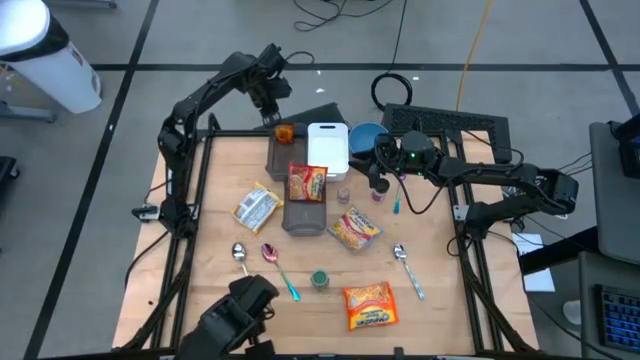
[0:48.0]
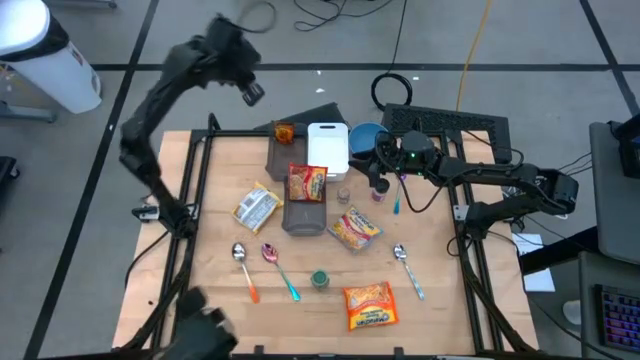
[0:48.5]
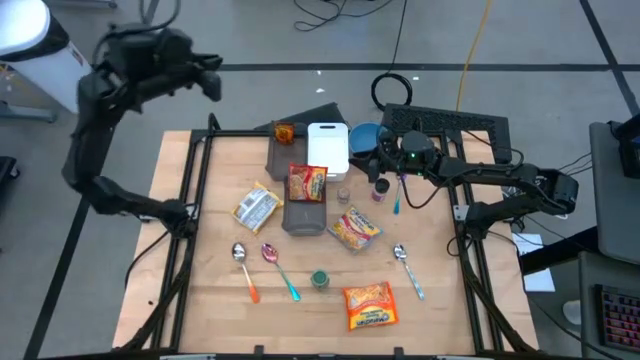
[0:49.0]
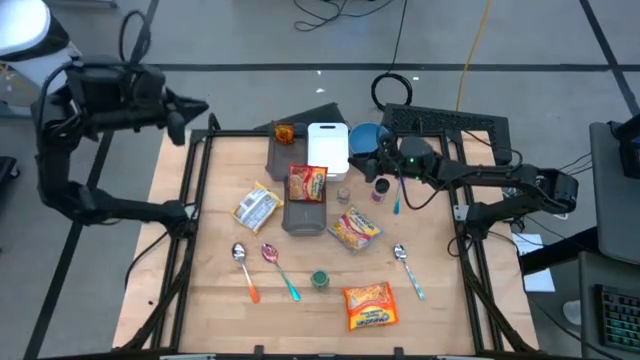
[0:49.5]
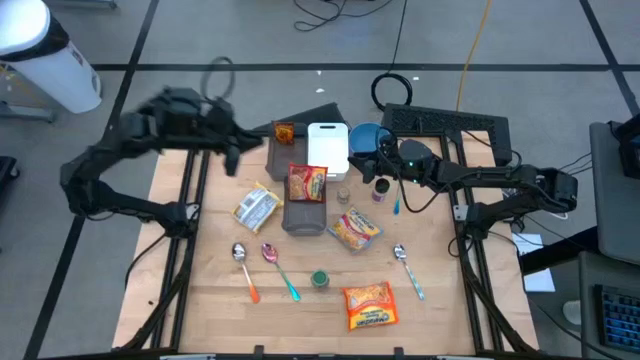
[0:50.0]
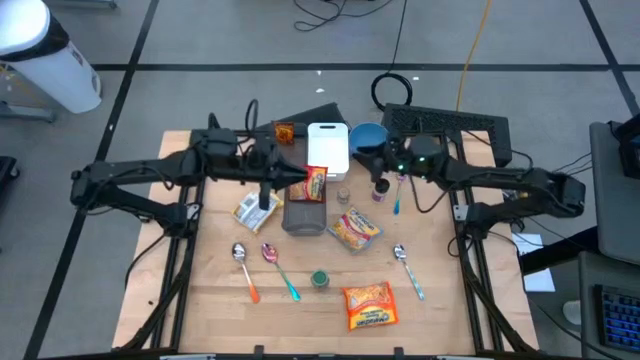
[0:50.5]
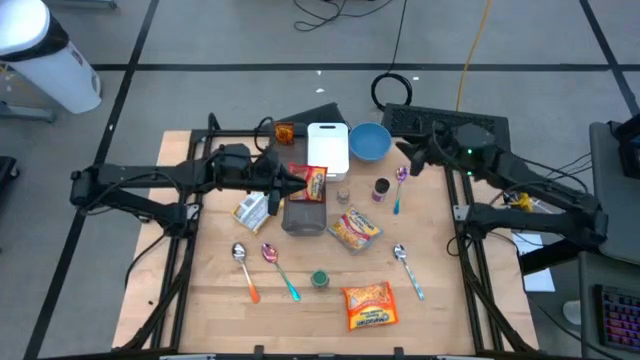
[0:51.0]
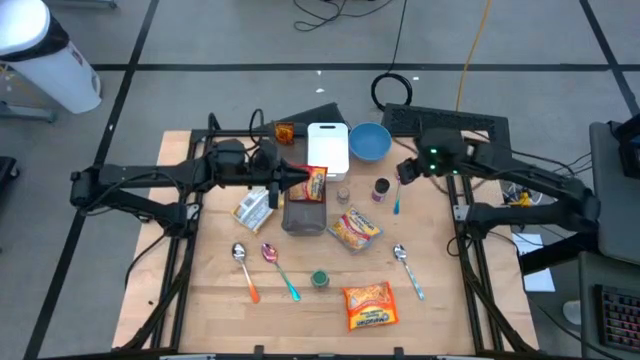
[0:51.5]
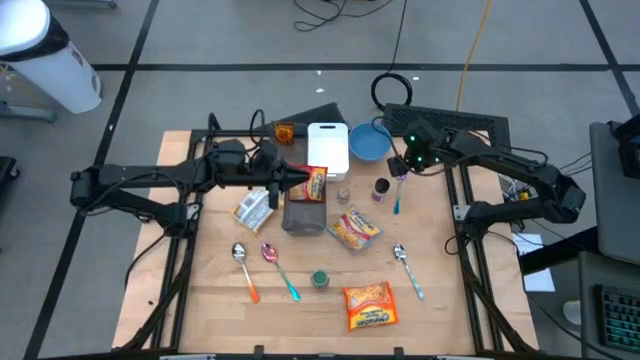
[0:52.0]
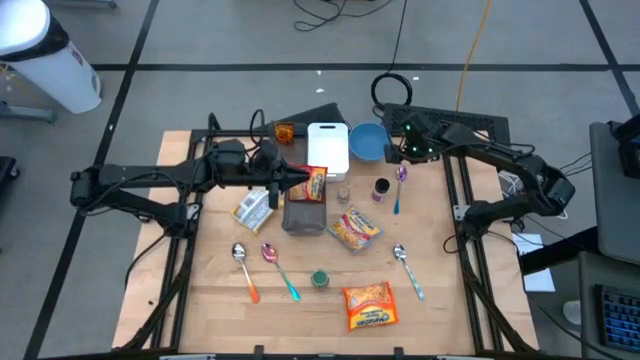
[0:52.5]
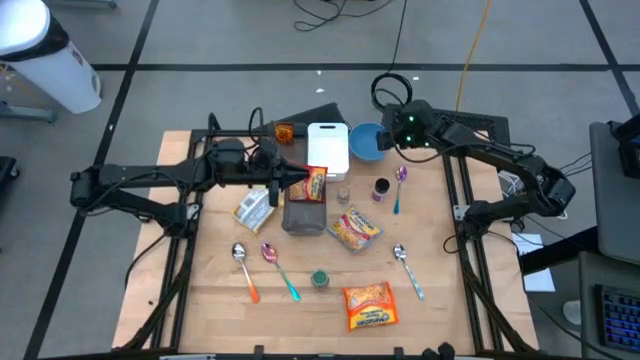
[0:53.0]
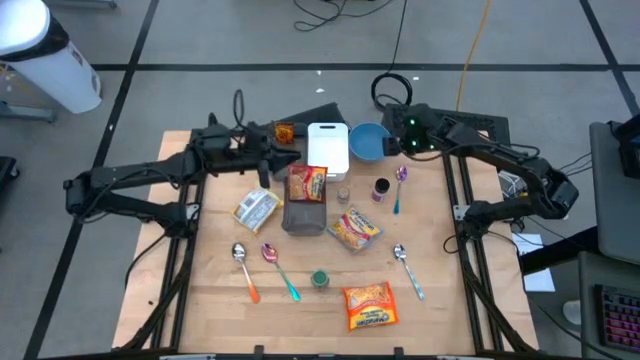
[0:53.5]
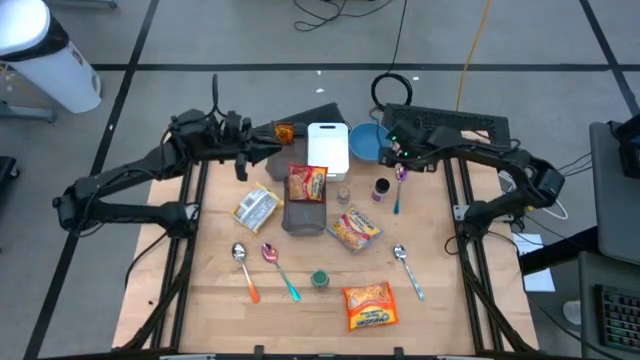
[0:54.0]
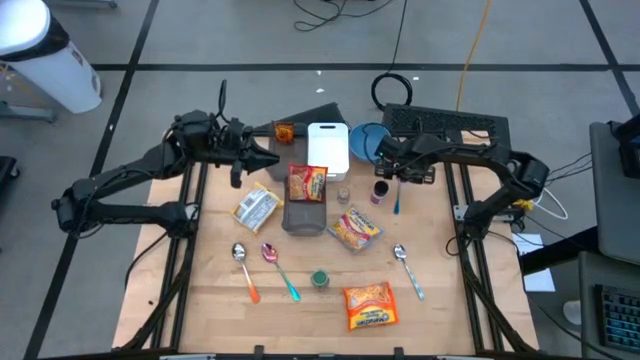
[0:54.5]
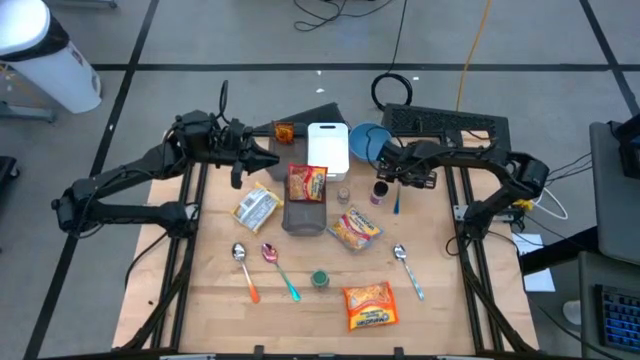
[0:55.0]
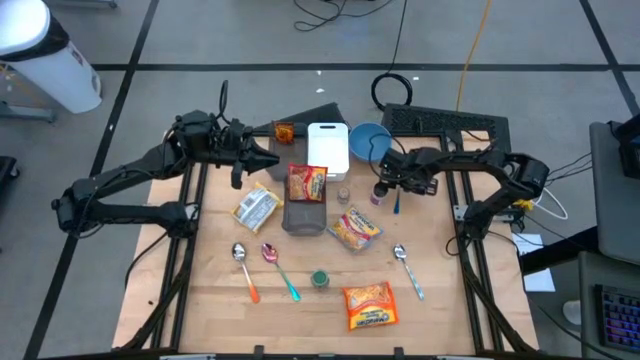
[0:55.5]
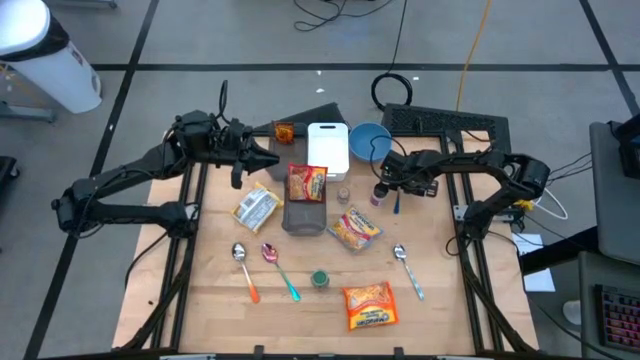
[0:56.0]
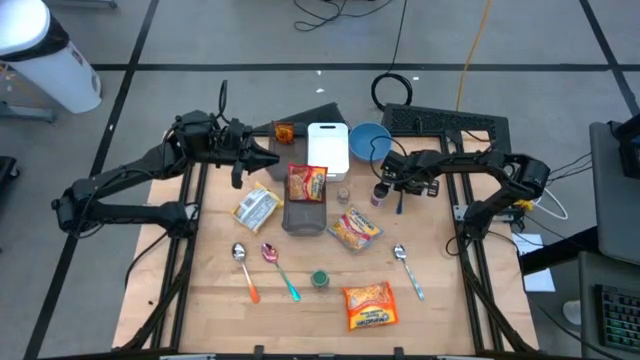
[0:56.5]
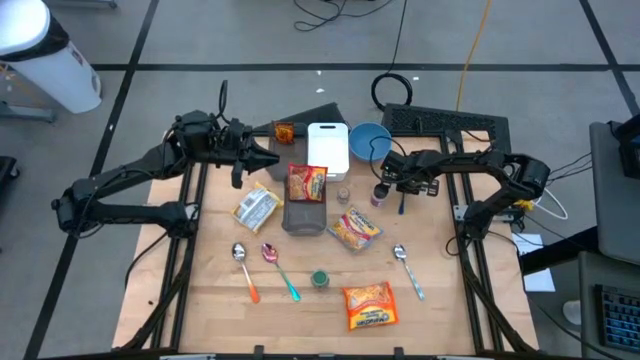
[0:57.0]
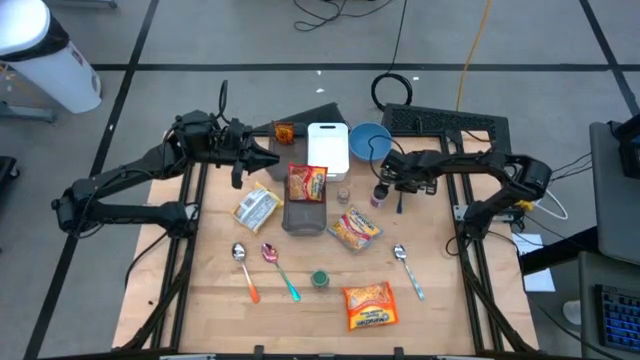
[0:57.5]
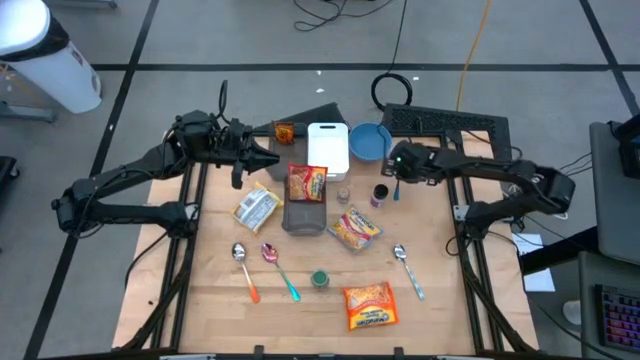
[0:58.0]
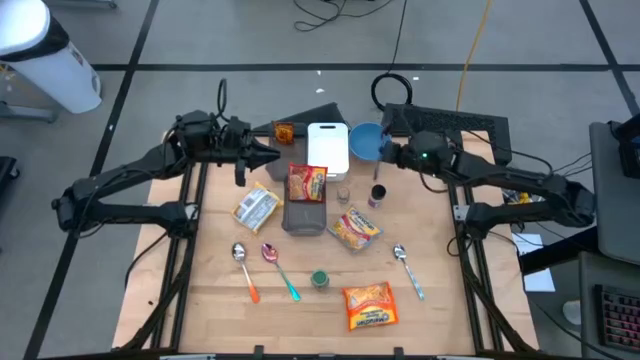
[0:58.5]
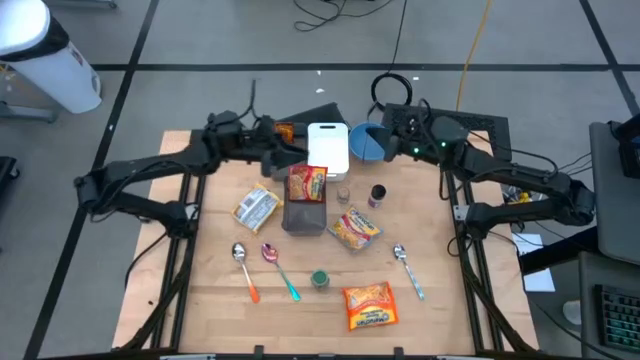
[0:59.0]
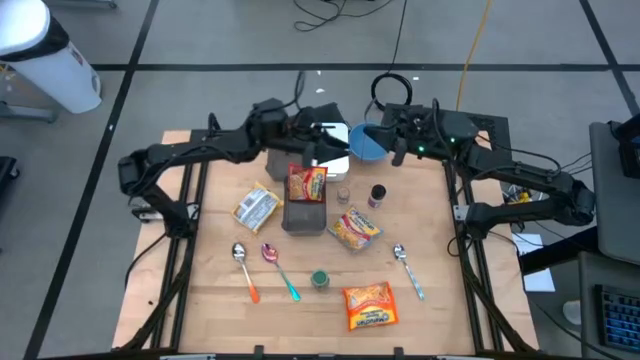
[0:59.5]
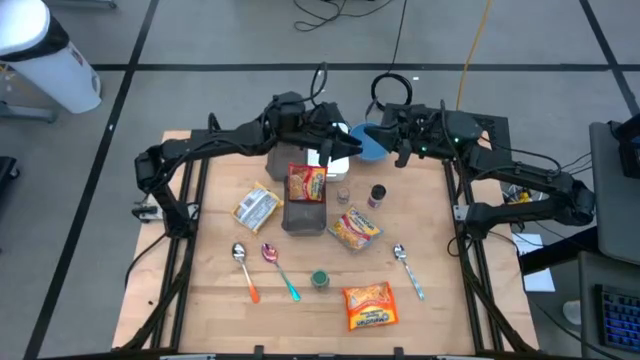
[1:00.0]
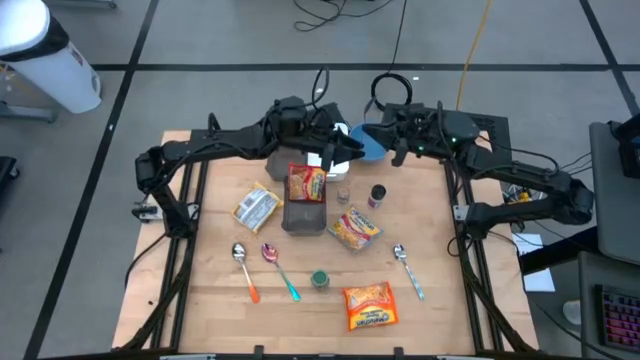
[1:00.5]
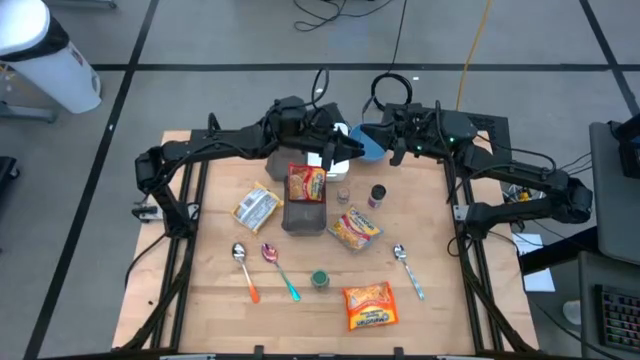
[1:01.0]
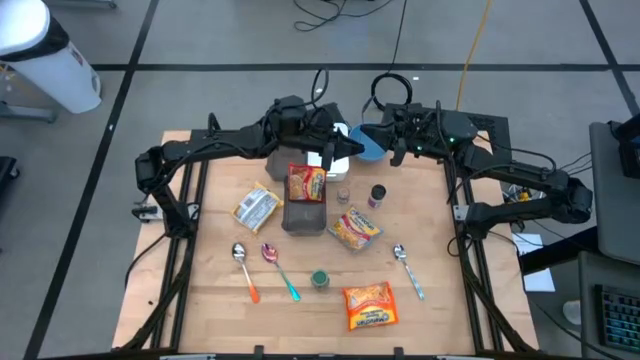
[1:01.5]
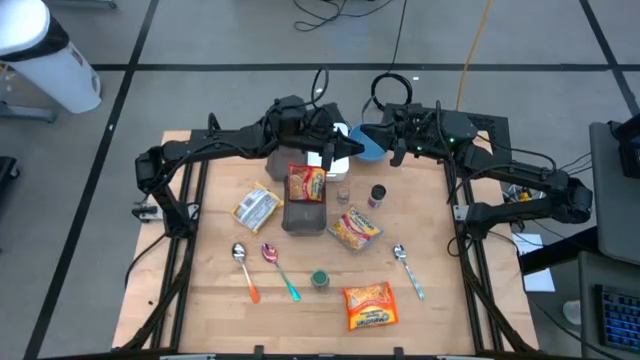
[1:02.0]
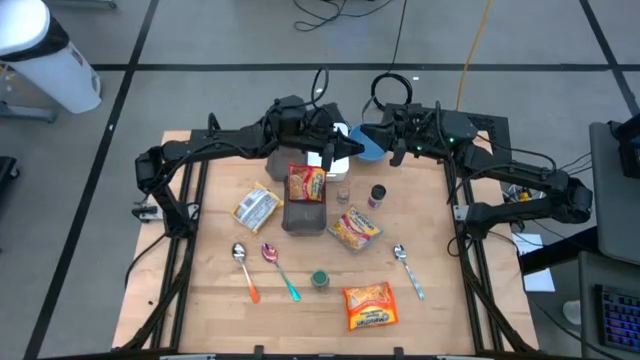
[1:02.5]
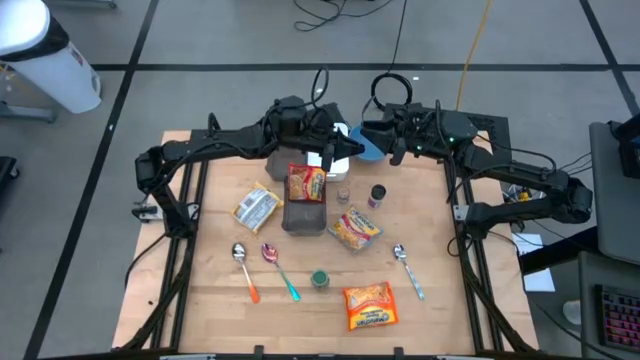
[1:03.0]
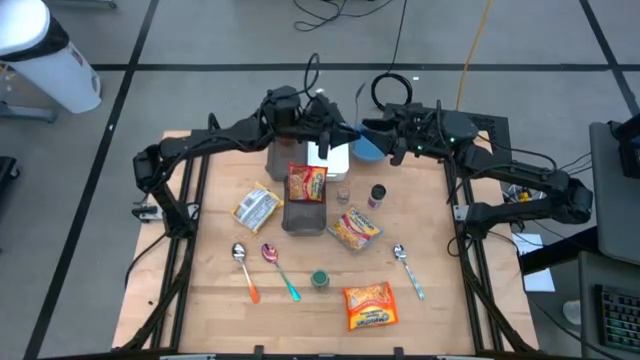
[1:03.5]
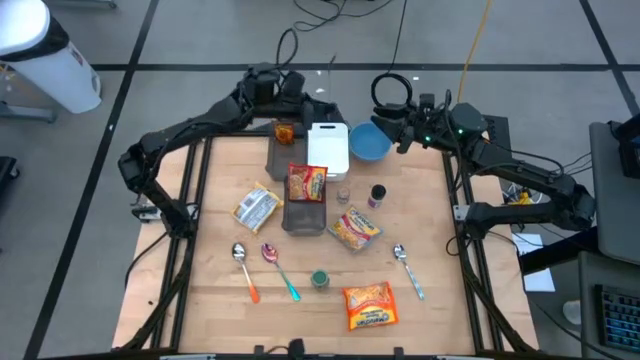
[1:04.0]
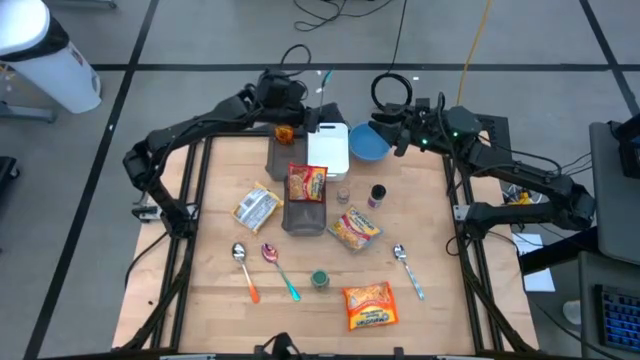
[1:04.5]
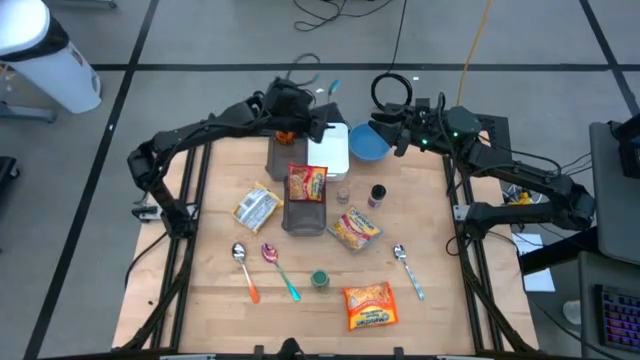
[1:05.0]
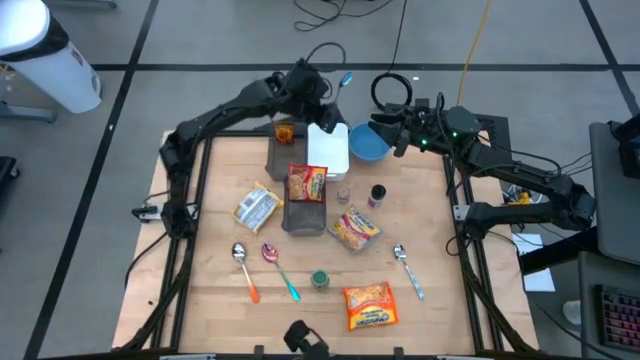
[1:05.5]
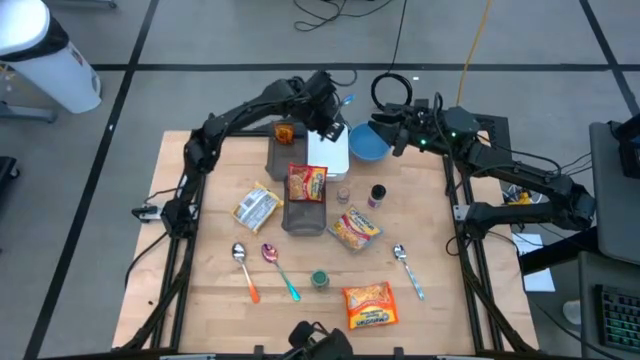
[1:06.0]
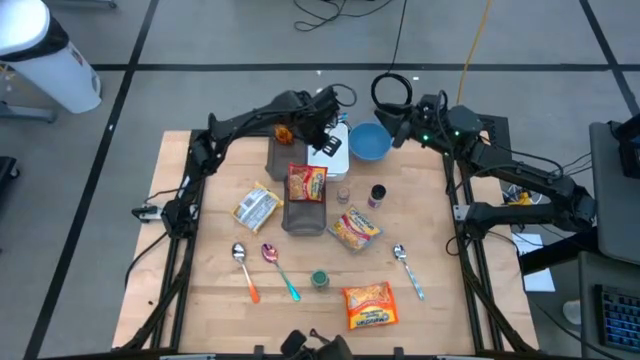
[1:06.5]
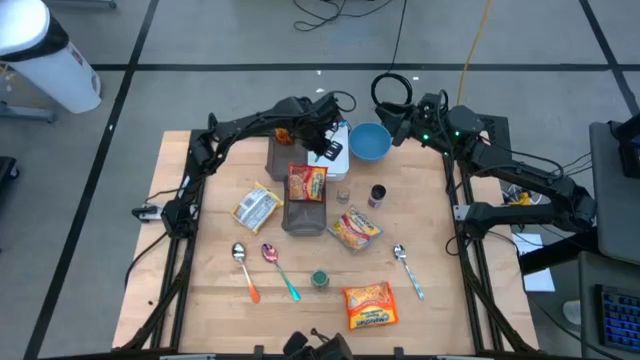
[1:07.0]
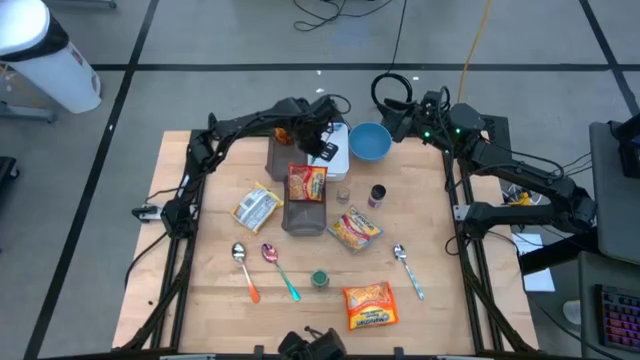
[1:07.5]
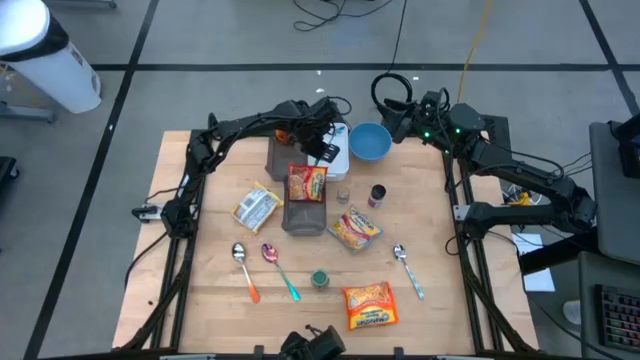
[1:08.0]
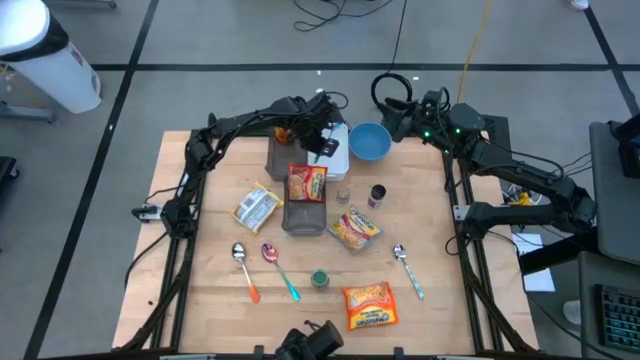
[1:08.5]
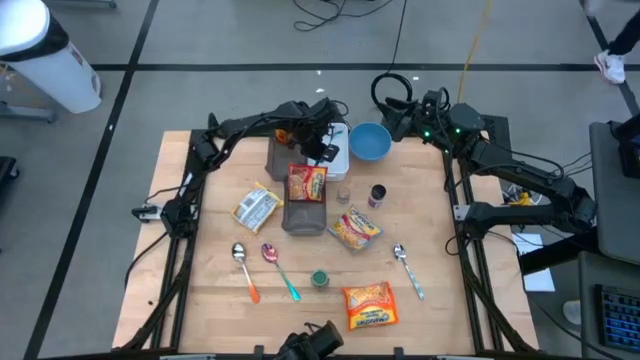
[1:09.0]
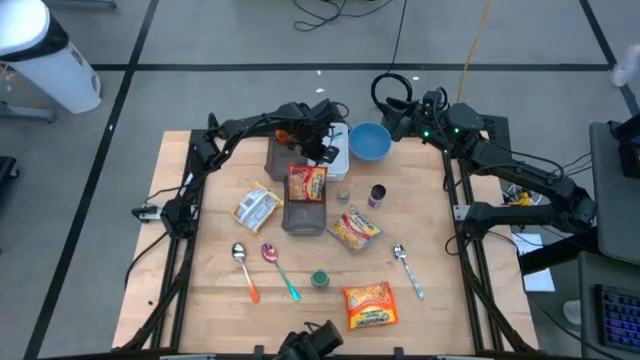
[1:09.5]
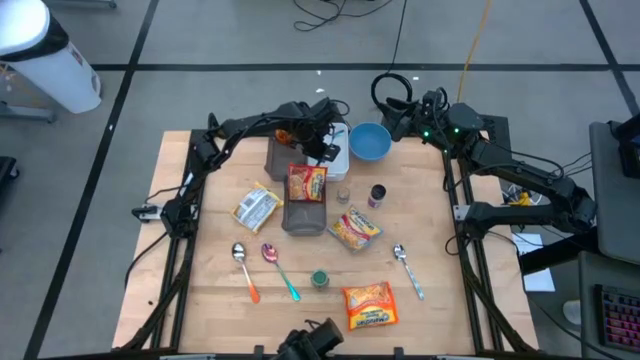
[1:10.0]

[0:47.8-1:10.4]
Task: Pick & Place Food Item
Put the blue spoon into the white bin
